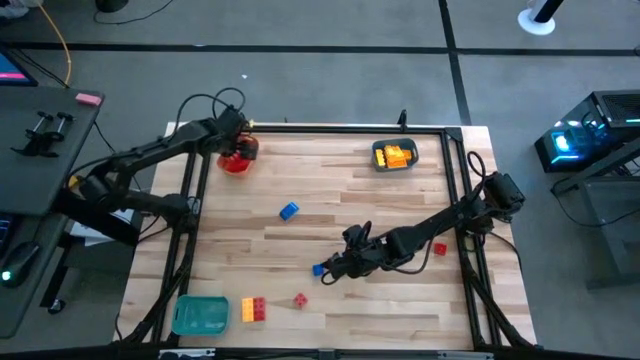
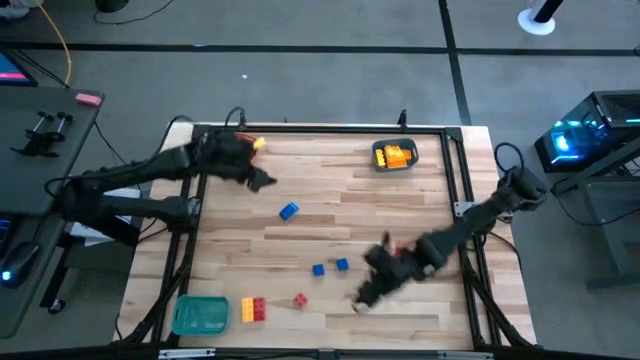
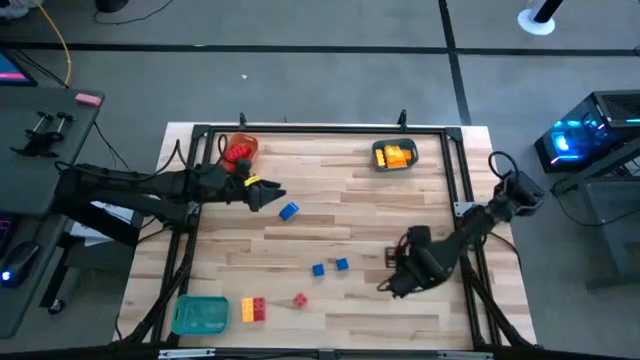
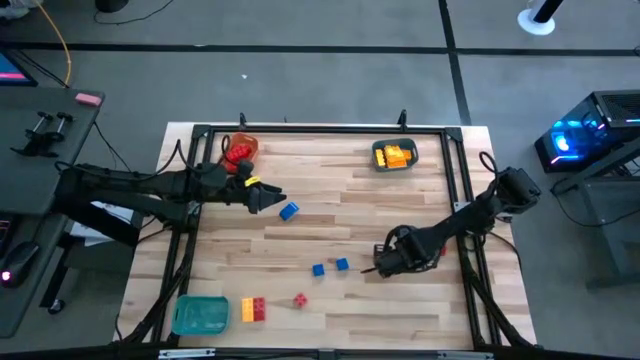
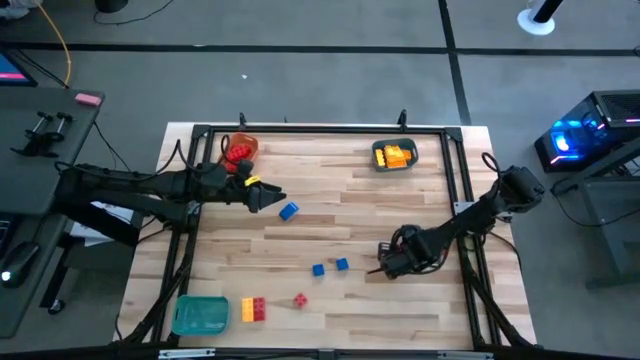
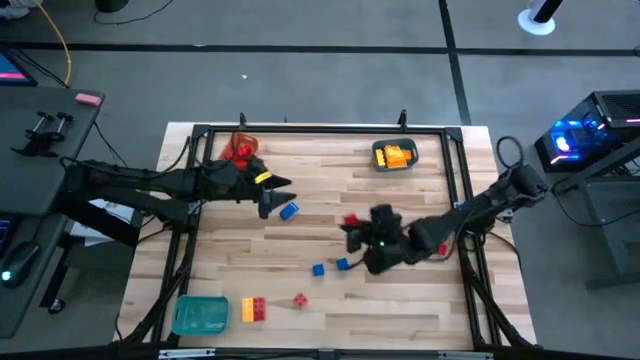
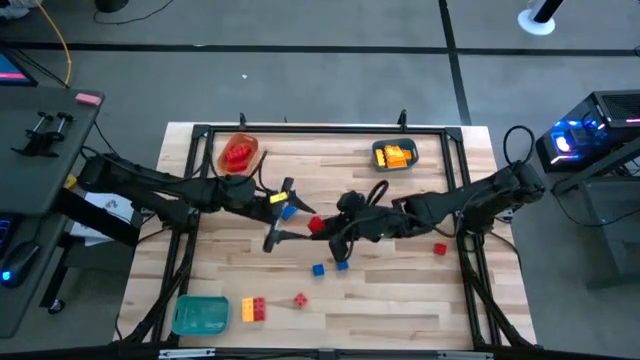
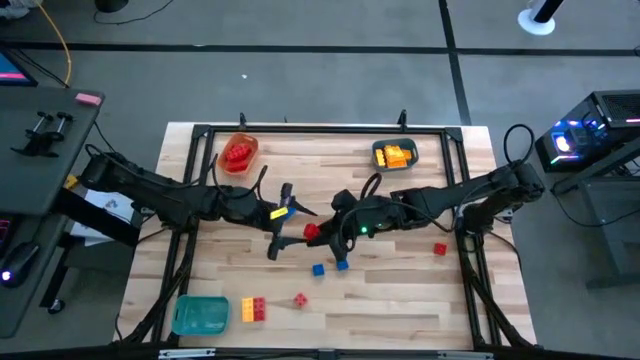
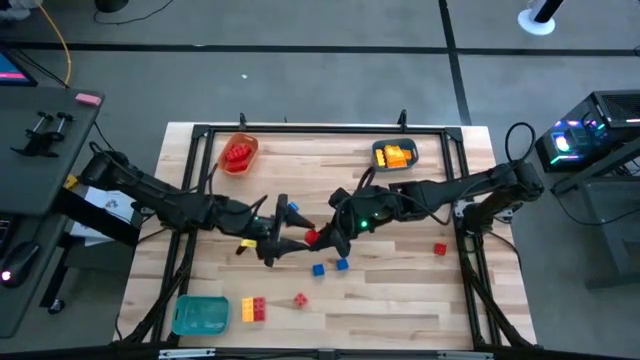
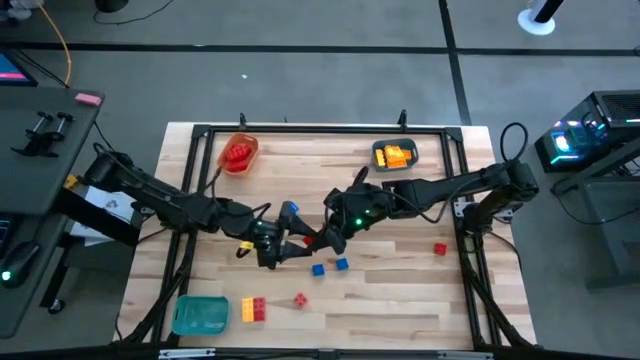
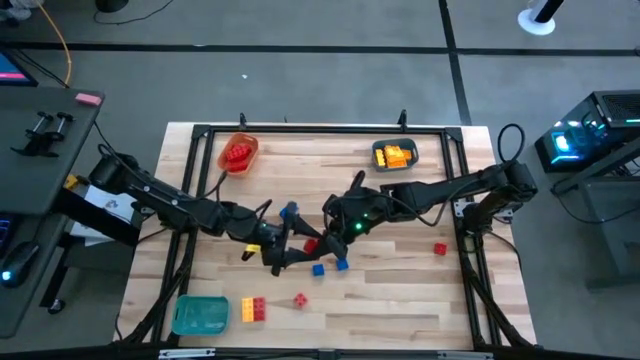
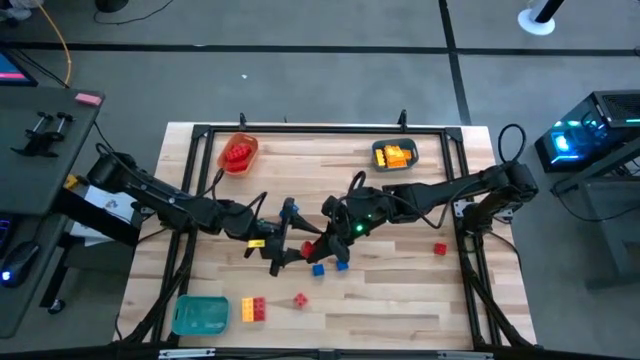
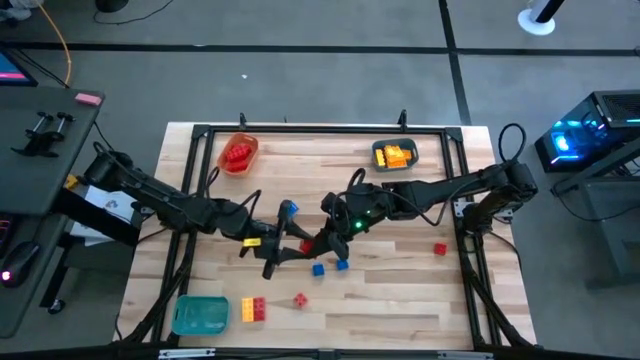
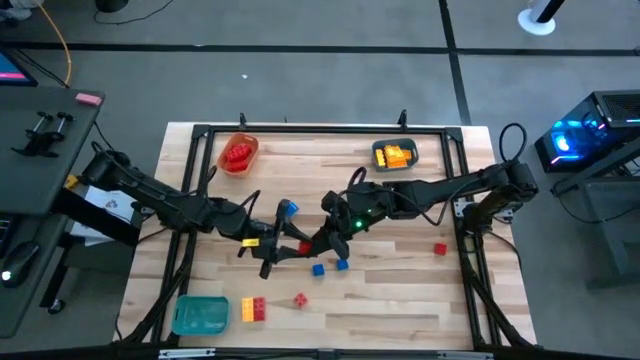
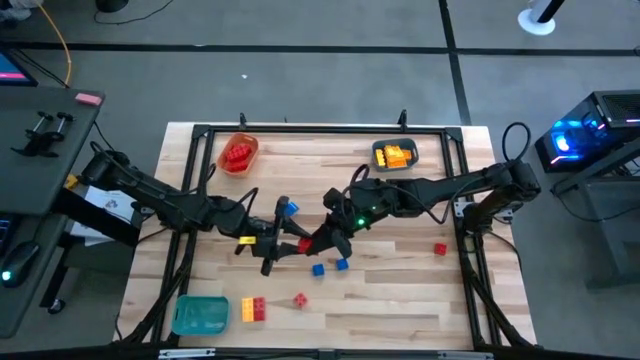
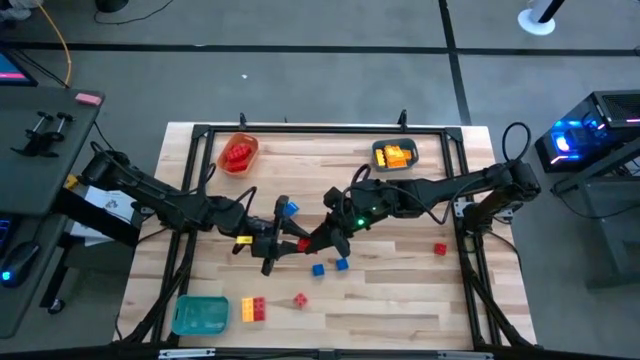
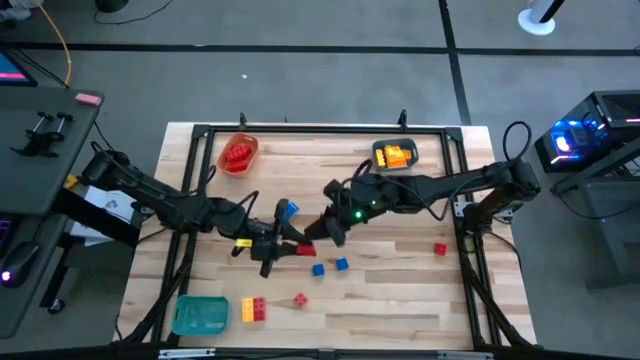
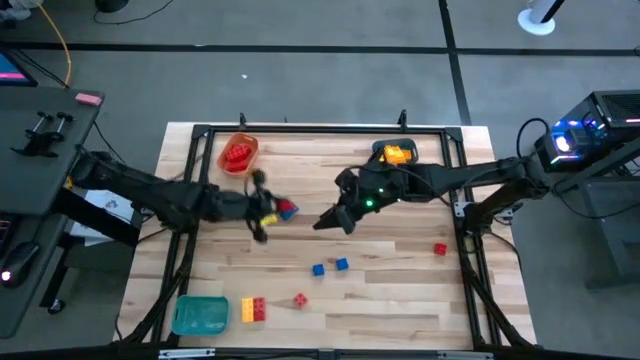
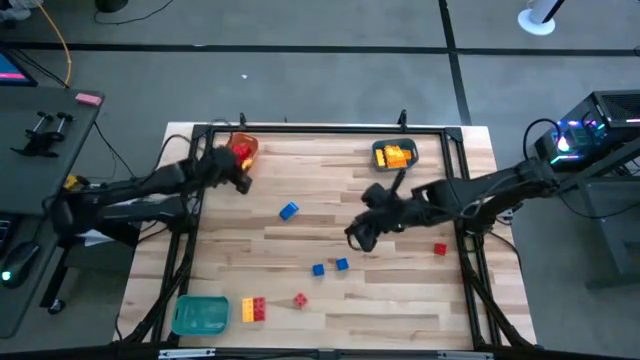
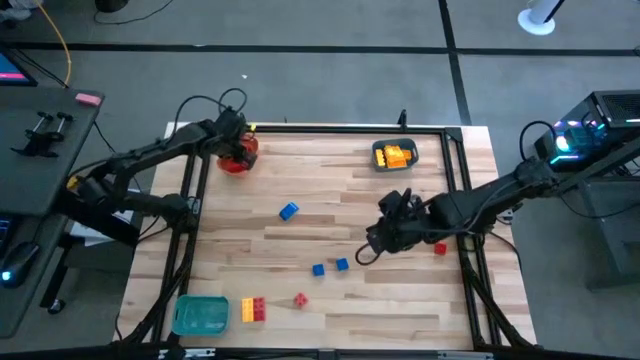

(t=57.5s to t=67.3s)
Task: Sort blocks
Put the red game piece into the orange bin

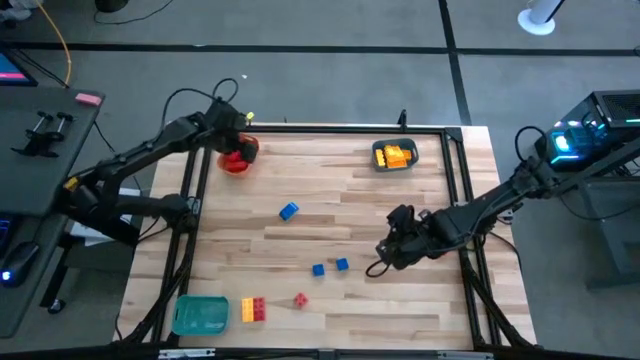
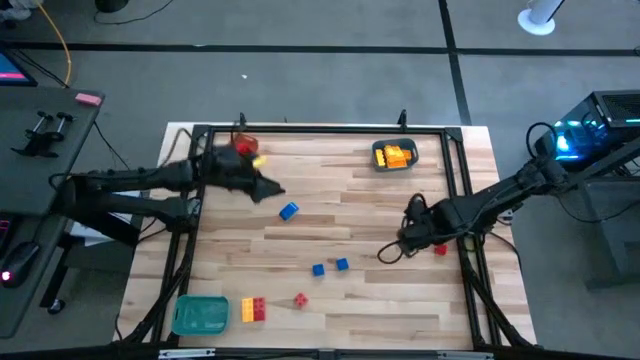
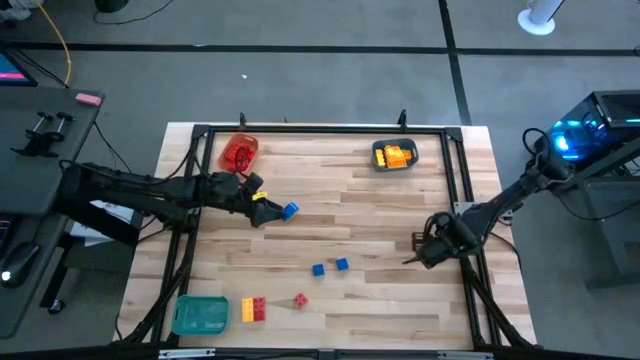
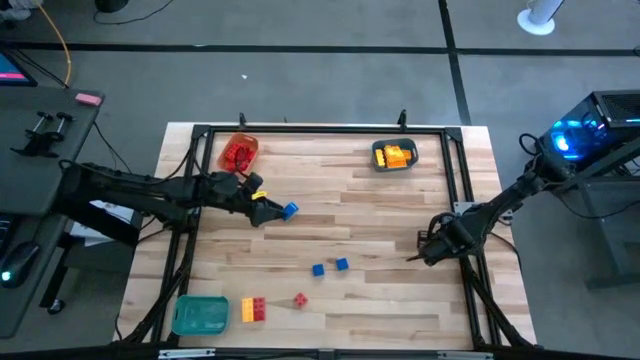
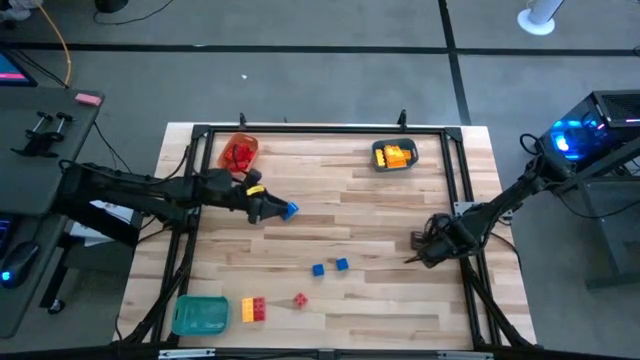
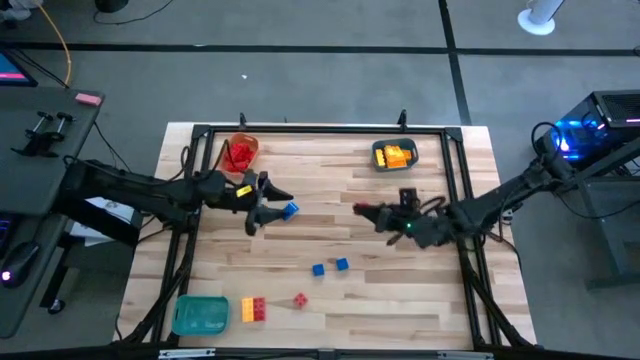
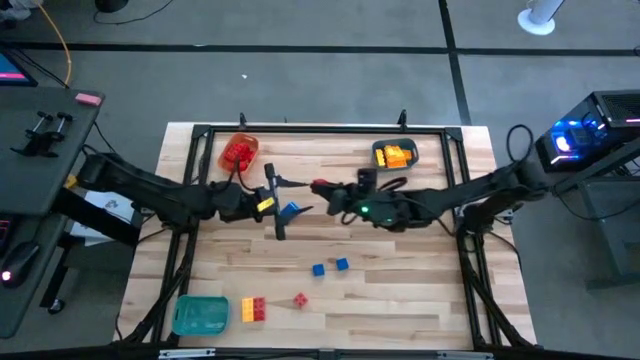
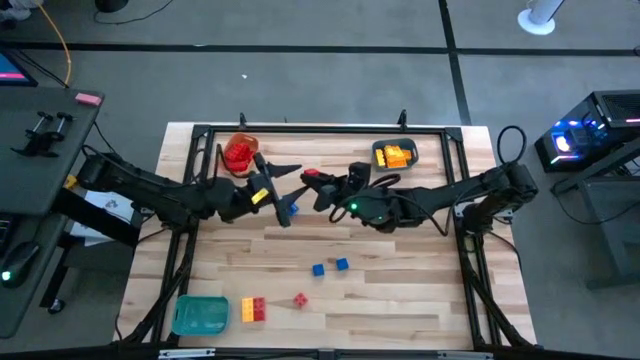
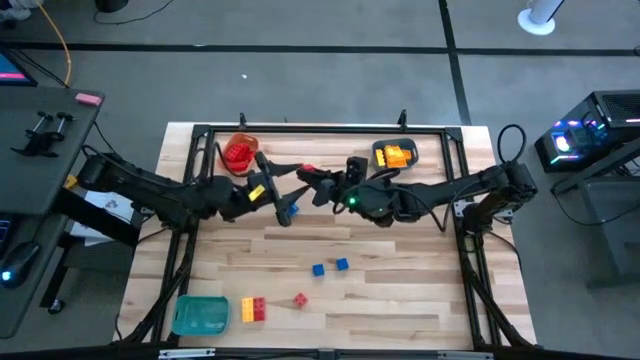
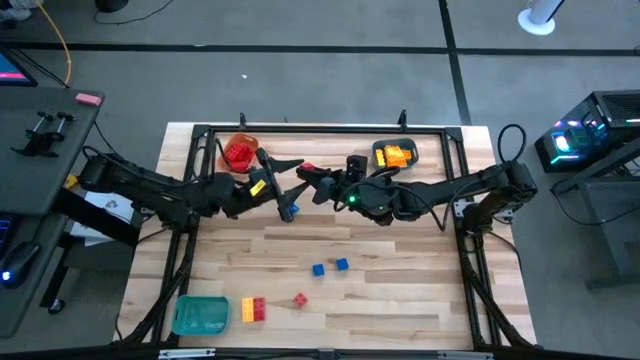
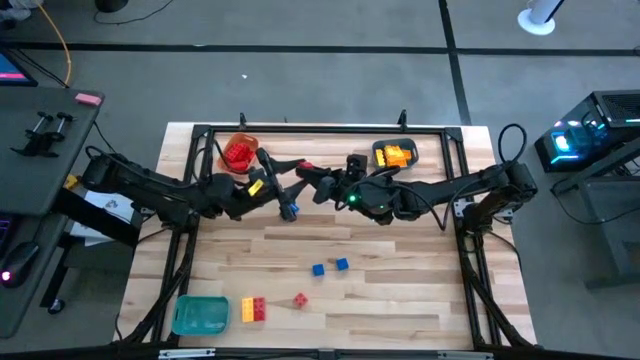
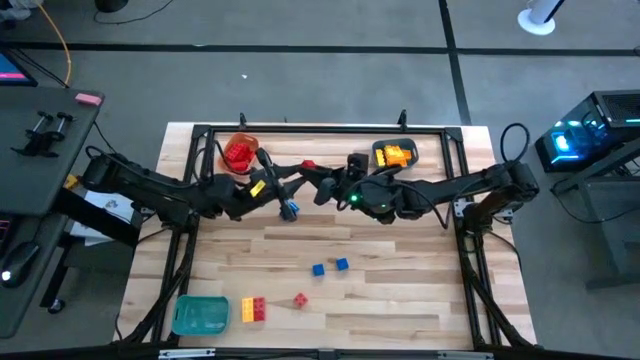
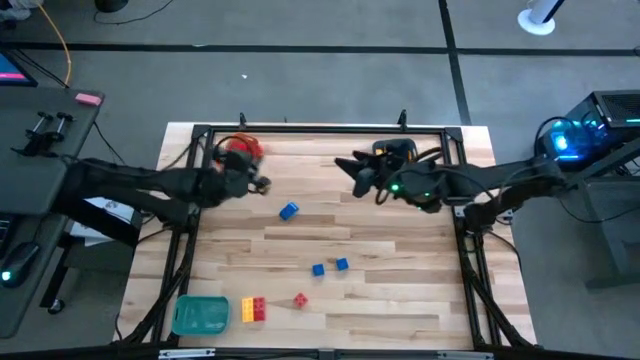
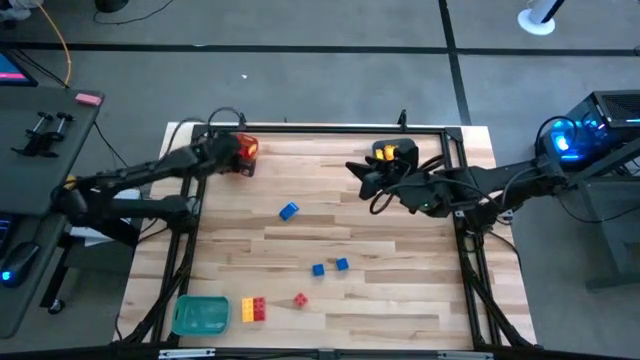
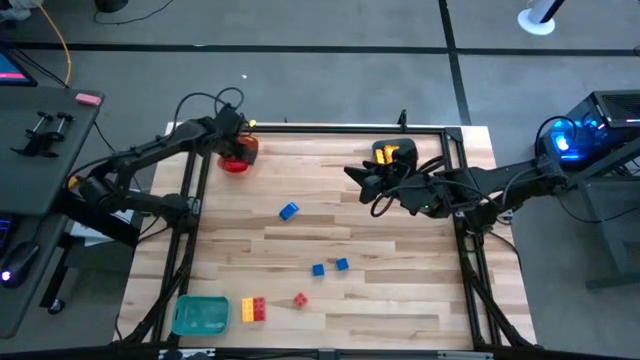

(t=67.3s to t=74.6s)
Put the red game piece into the orange bin

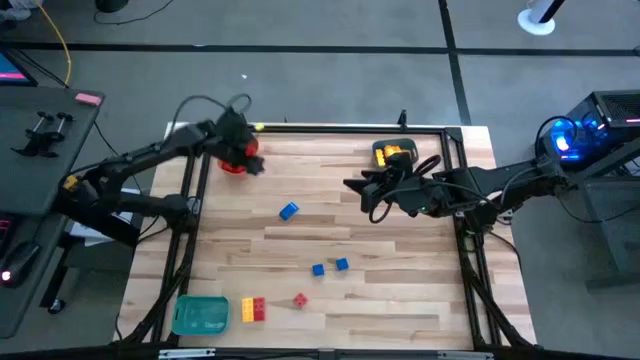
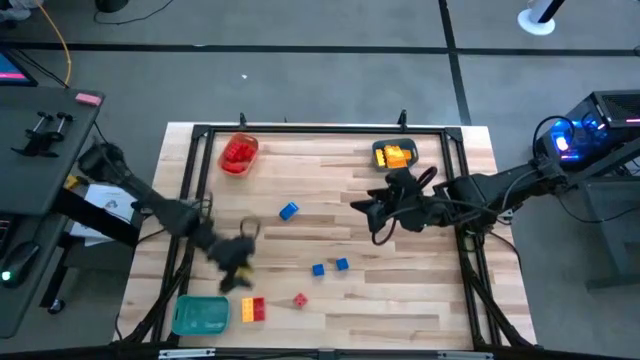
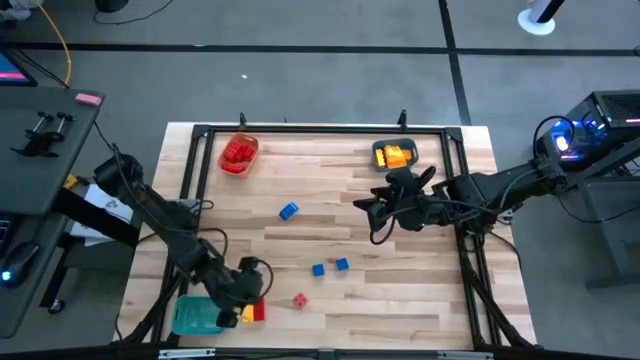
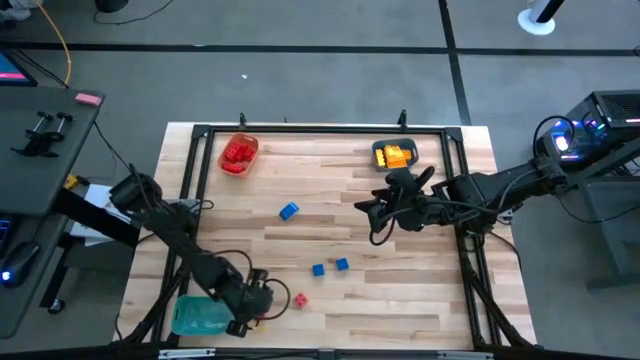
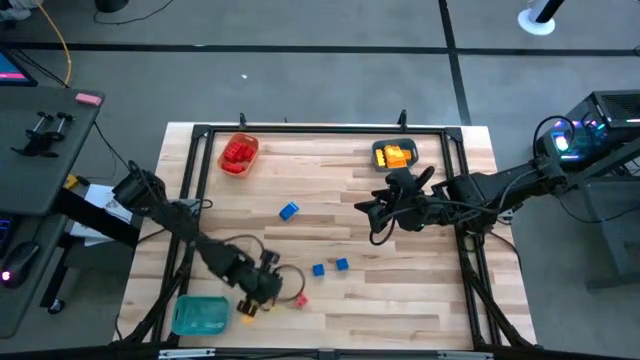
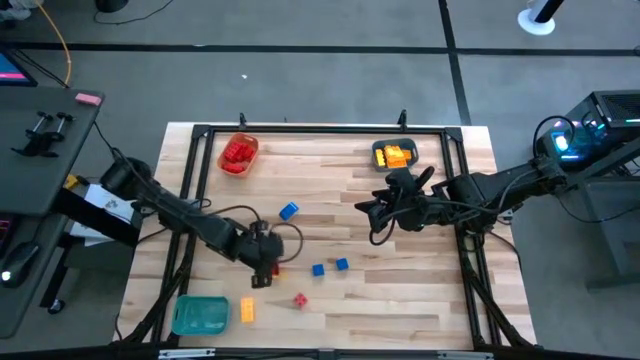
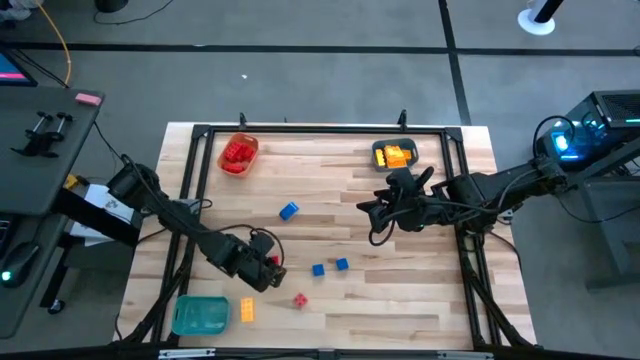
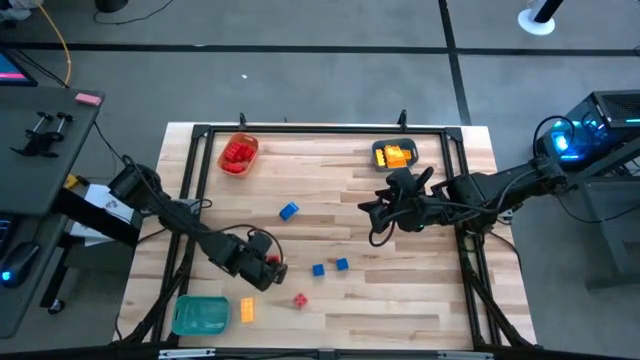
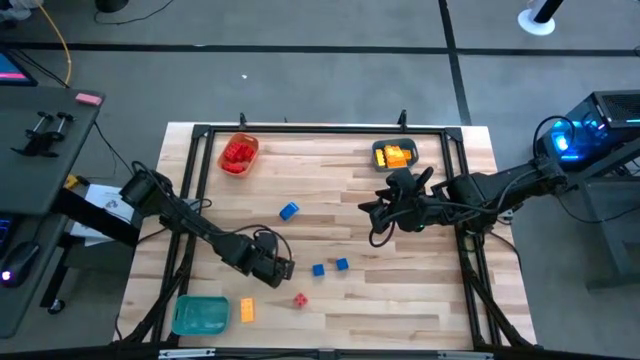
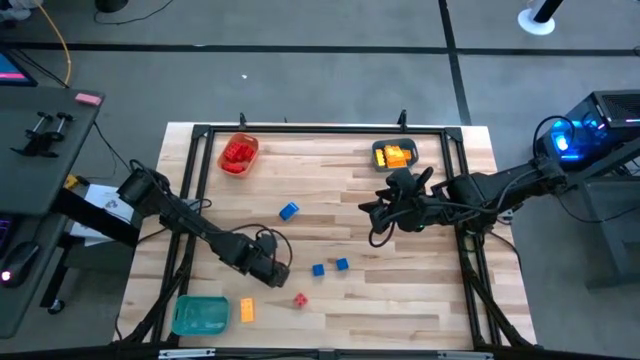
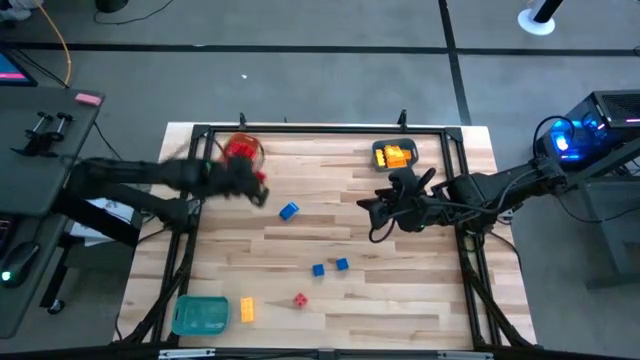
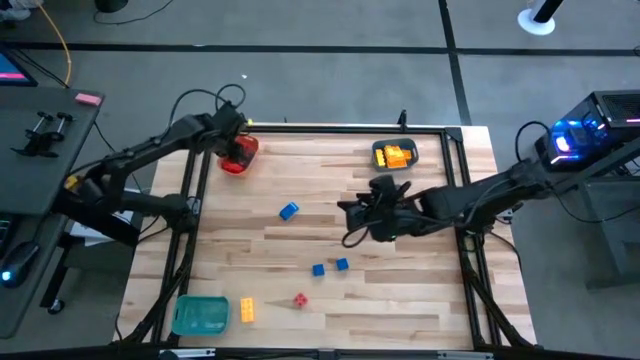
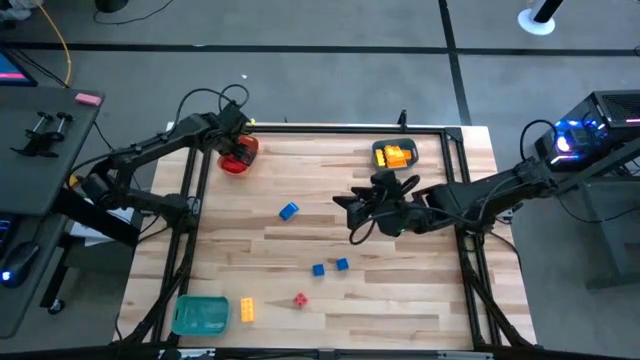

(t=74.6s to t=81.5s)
Put the red game piece into the orange bin
